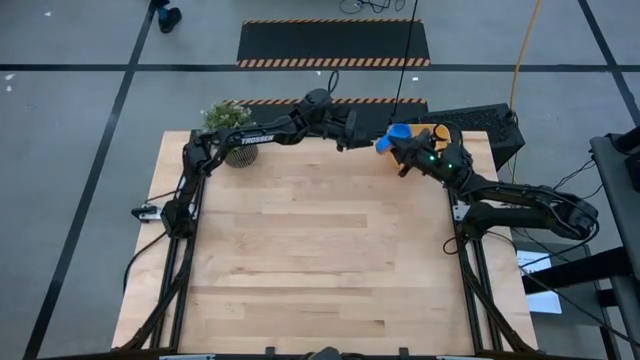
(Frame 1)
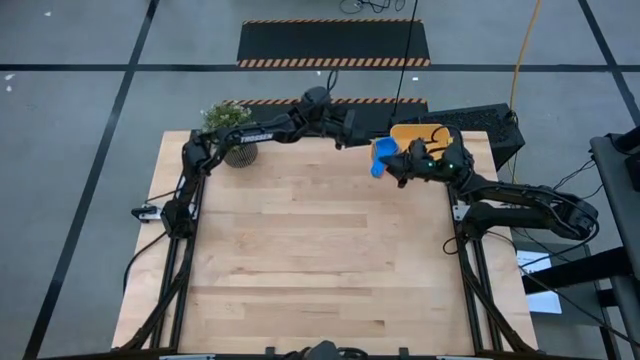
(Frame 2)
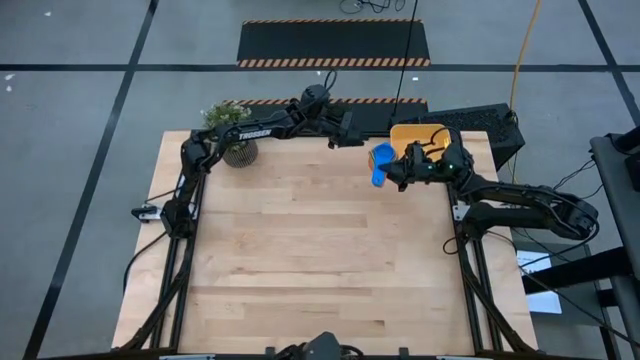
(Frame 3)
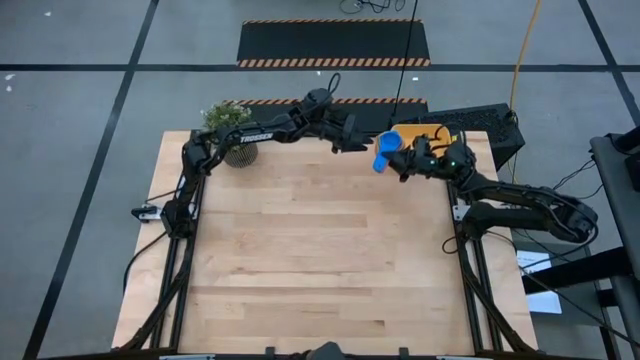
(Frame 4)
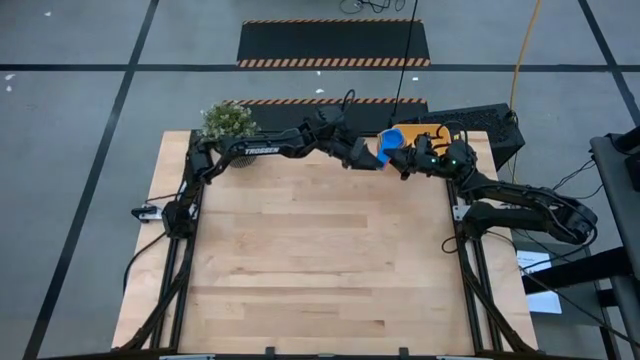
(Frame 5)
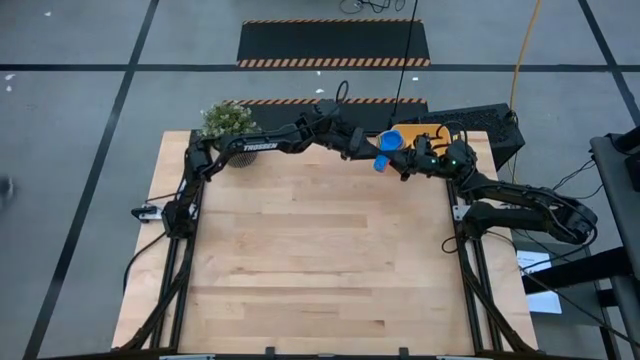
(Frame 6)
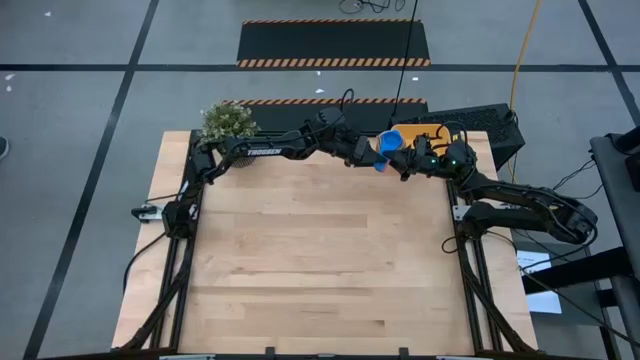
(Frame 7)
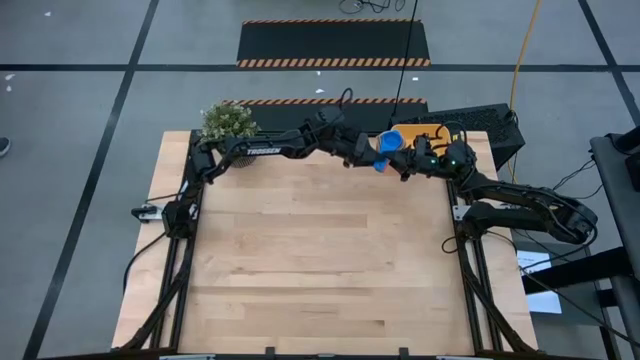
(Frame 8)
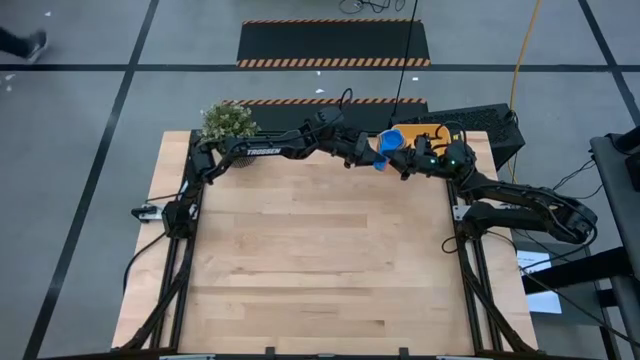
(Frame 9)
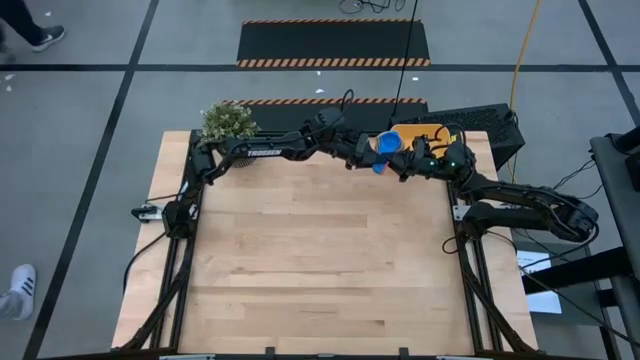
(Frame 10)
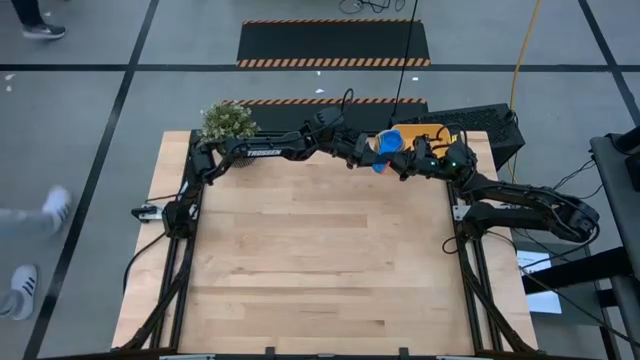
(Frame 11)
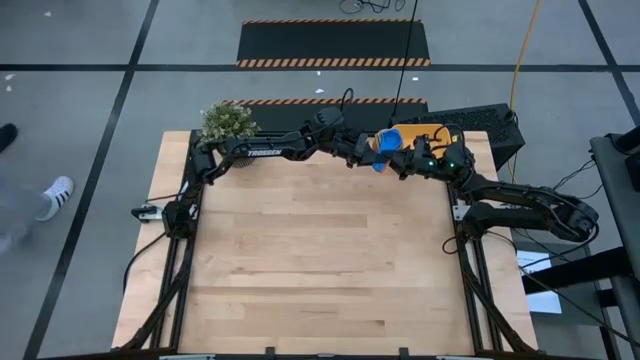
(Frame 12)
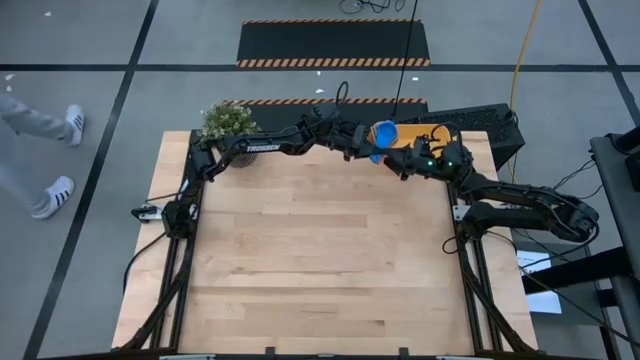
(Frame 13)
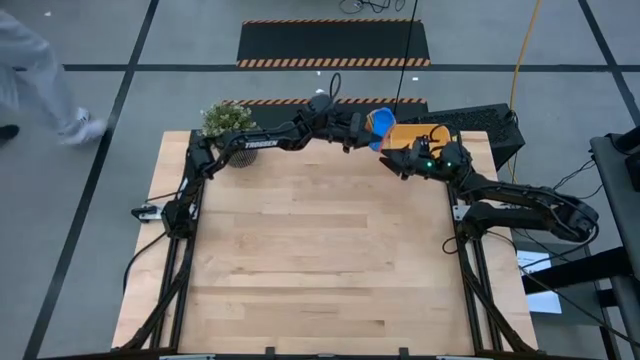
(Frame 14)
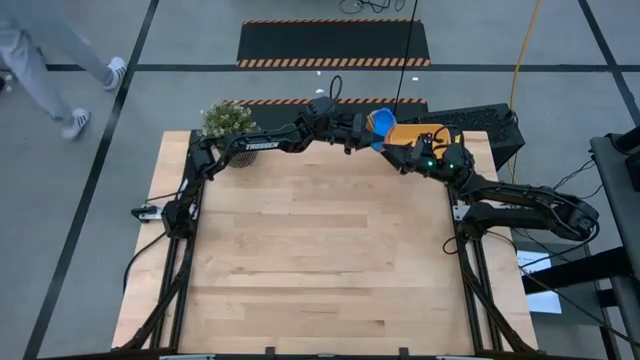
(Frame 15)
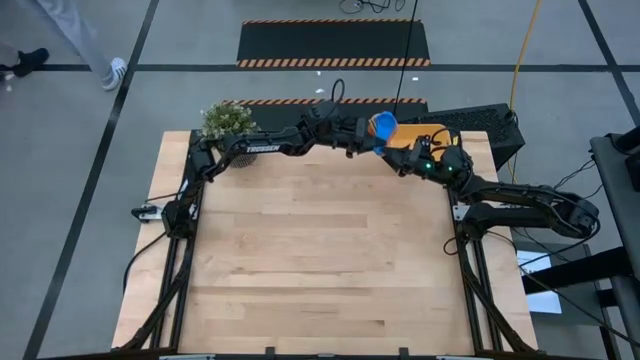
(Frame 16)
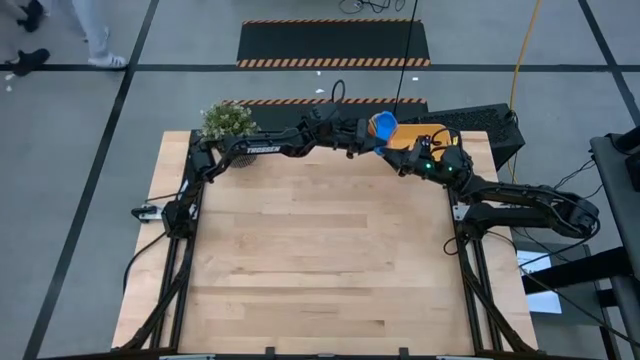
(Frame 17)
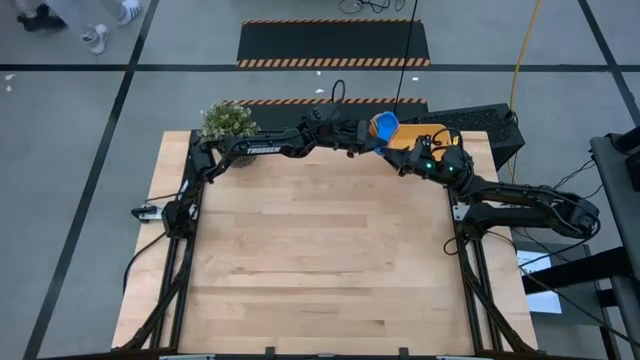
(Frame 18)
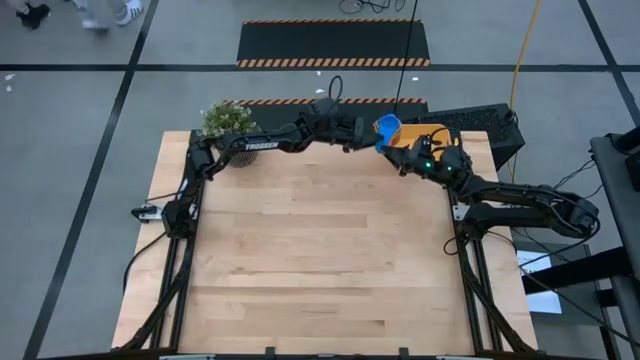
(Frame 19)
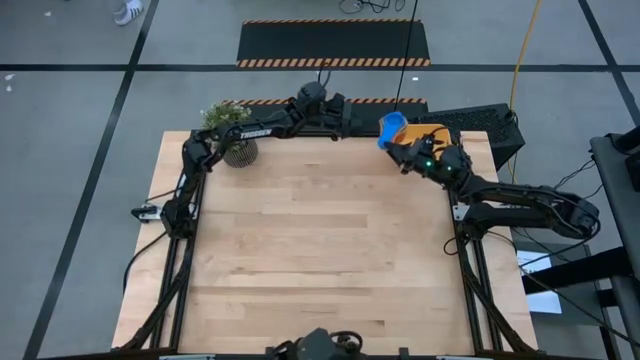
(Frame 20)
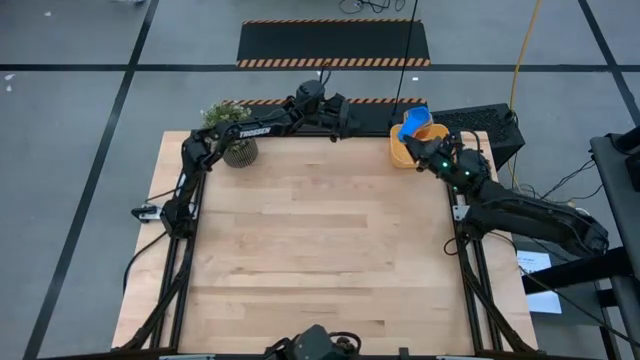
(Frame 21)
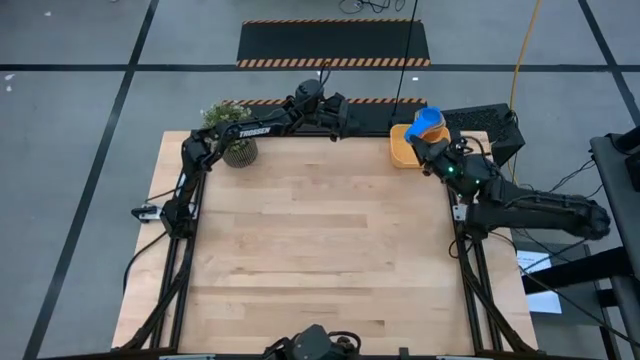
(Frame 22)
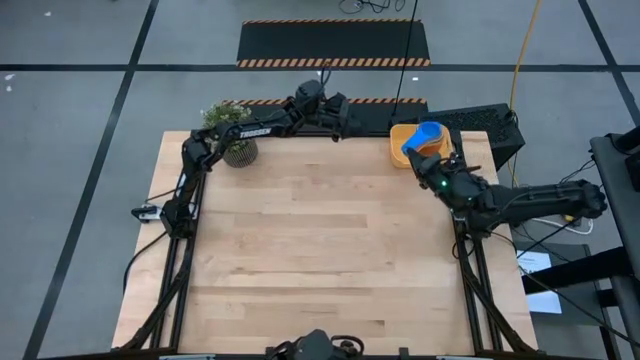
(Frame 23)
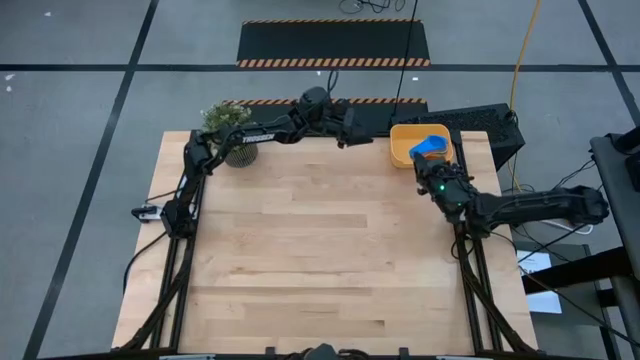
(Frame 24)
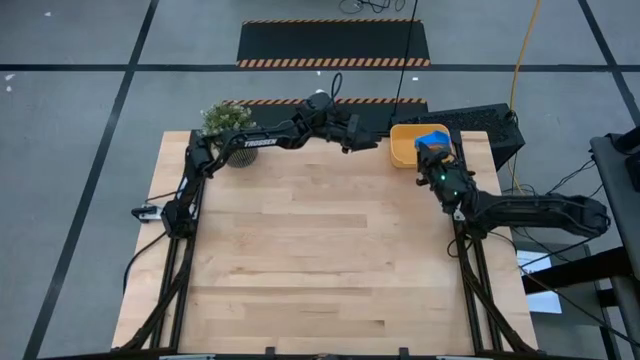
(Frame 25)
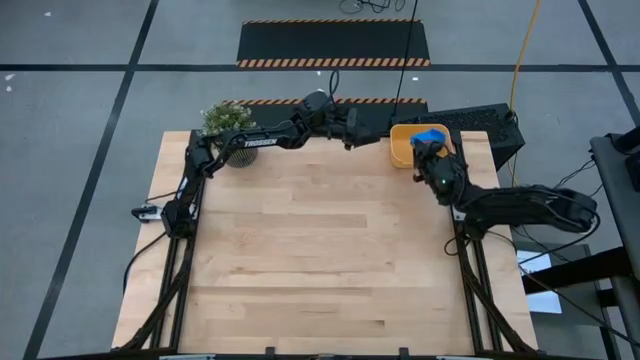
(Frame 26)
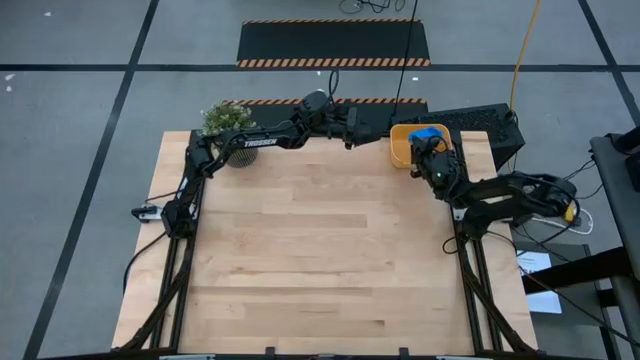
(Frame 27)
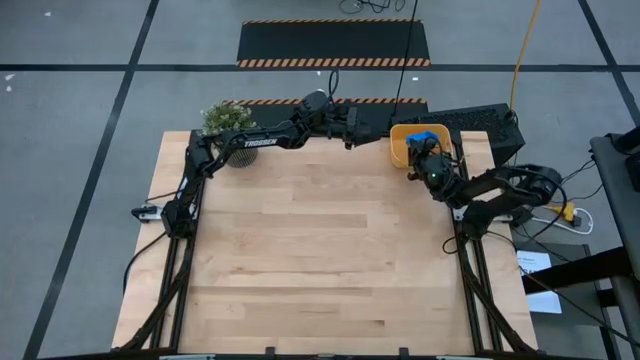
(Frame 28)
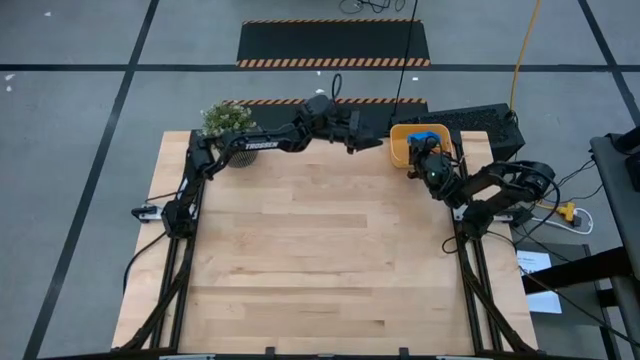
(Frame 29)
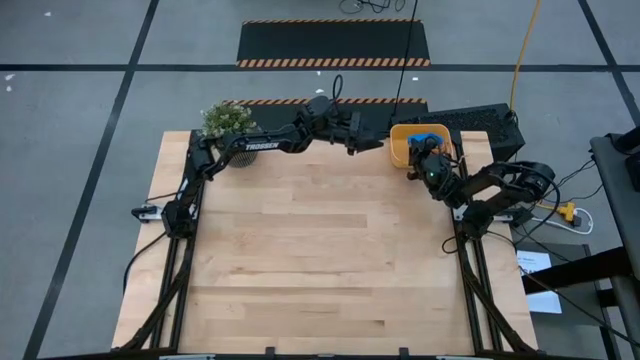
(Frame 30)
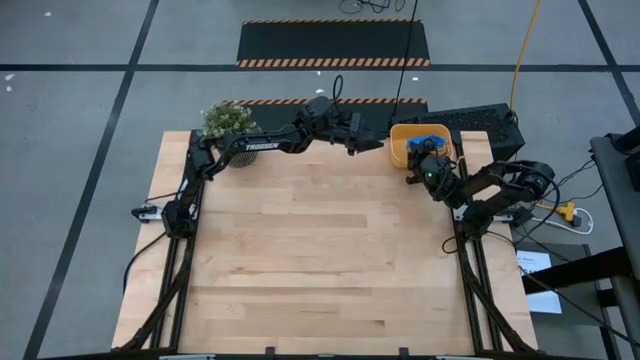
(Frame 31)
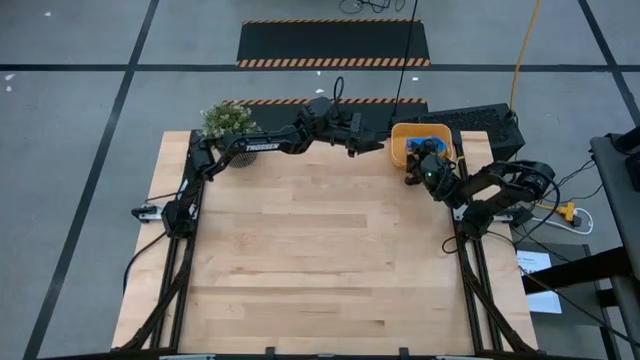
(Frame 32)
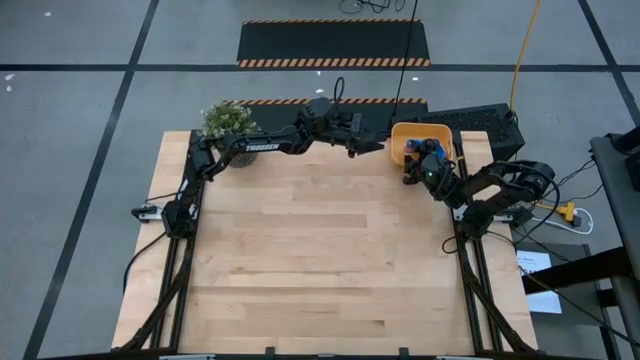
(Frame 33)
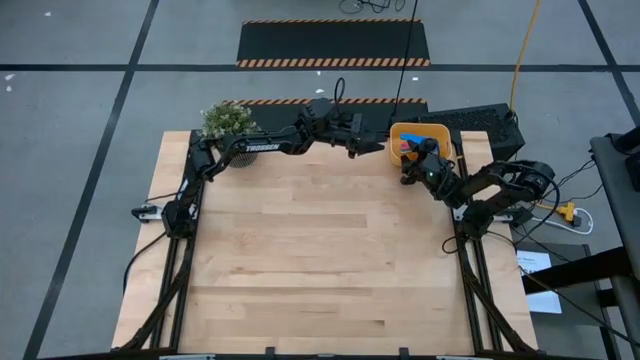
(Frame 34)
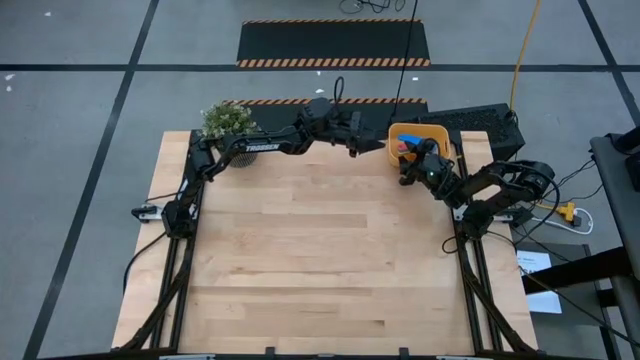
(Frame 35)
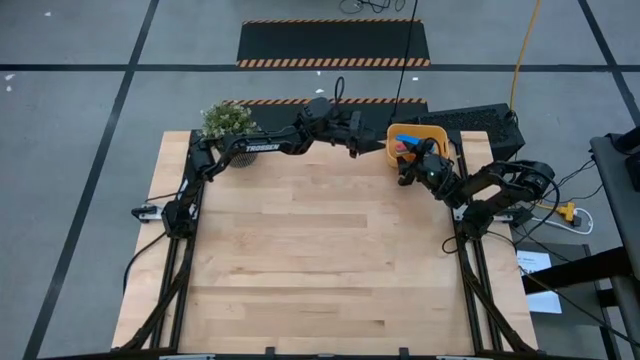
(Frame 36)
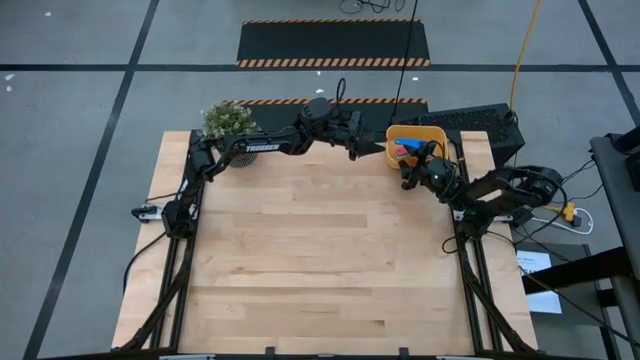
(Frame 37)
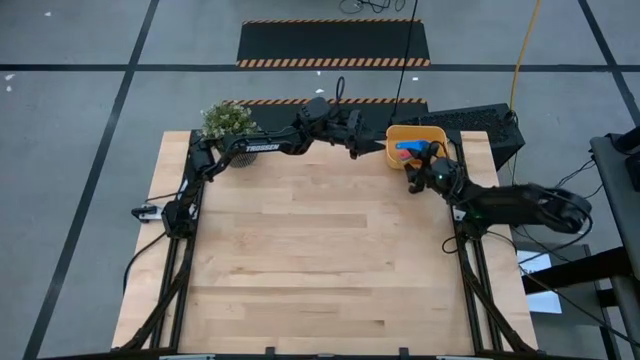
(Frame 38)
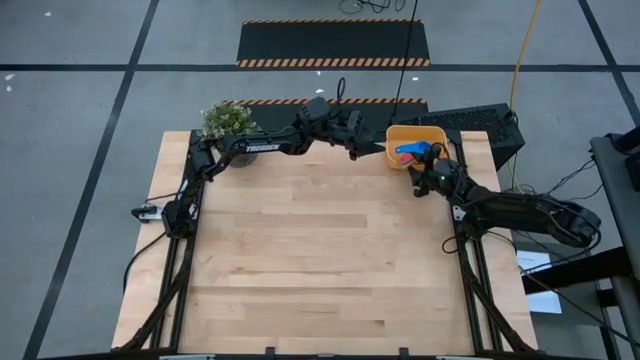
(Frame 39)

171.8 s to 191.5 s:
Task: Nest measuring cups in basket
Put the nested measuring cups into the yellow bin

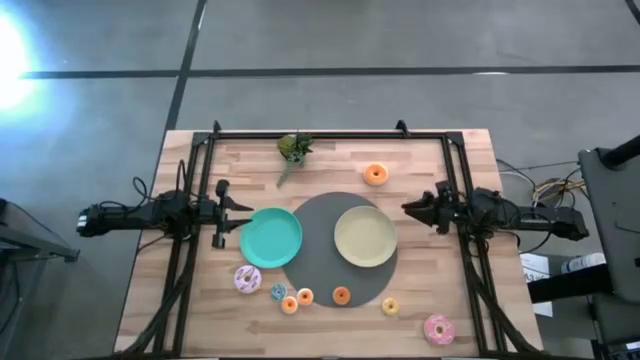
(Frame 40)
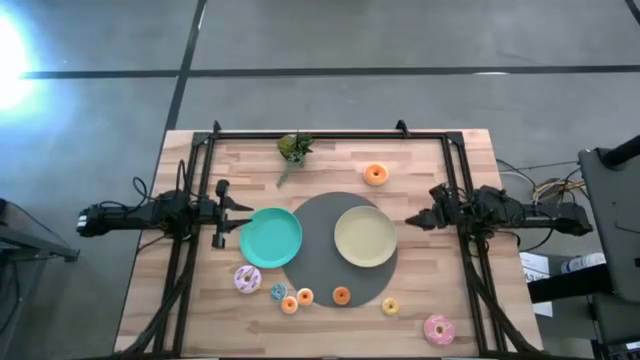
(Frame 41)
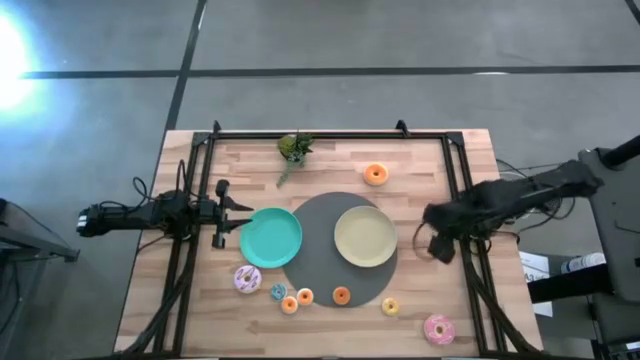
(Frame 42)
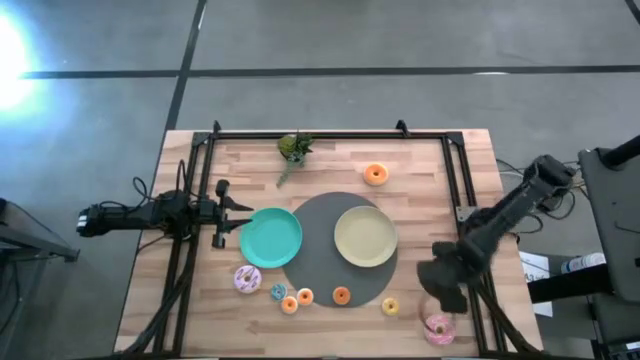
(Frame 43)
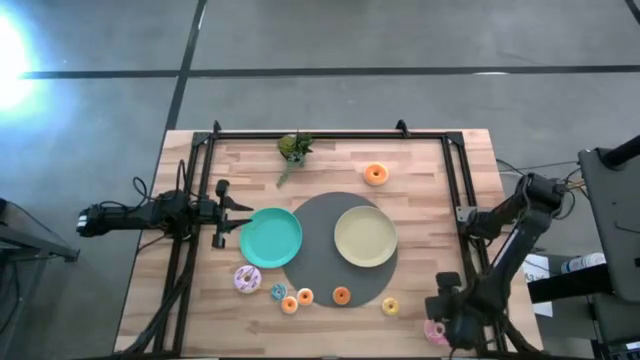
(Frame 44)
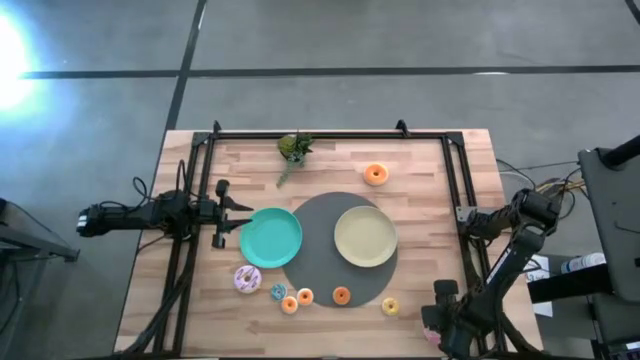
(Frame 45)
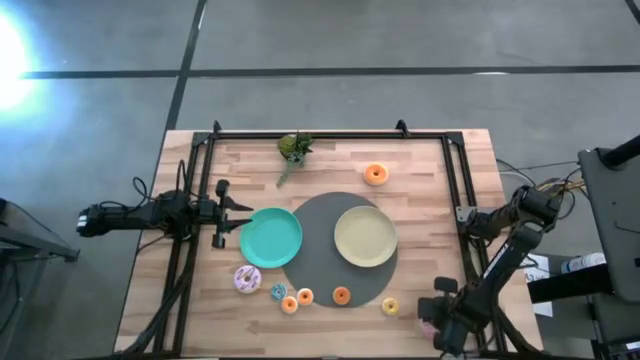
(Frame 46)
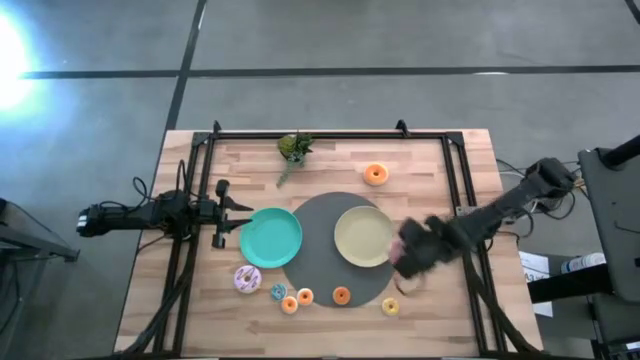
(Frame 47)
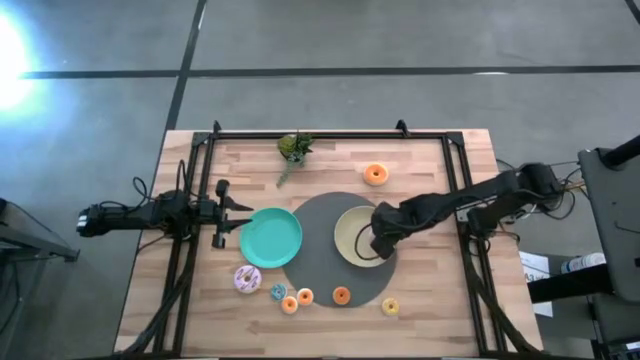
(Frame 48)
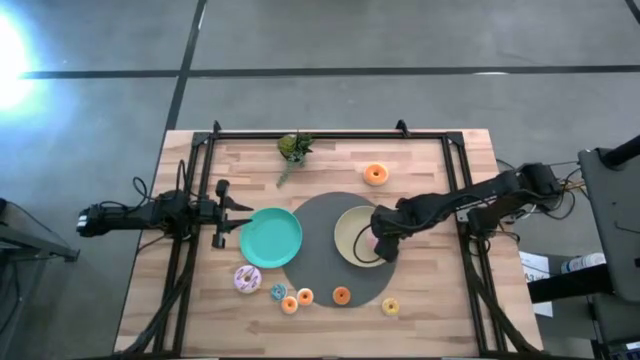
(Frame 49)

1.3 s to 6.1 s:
Task: Pick & Place donuts
Put the pink doughnut on the light brown plate
